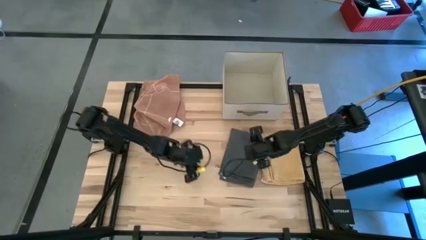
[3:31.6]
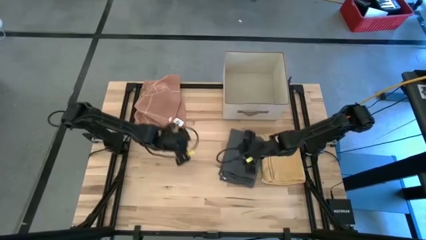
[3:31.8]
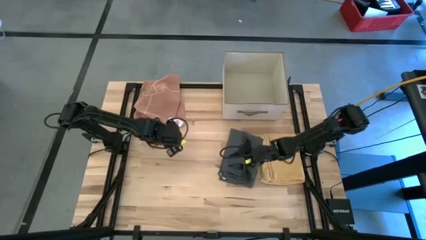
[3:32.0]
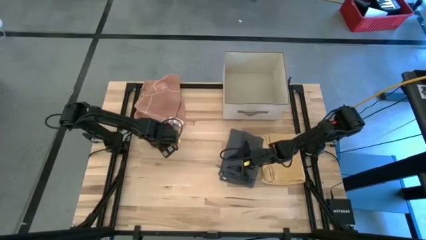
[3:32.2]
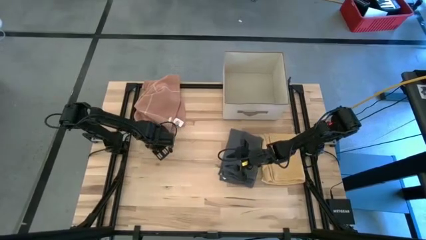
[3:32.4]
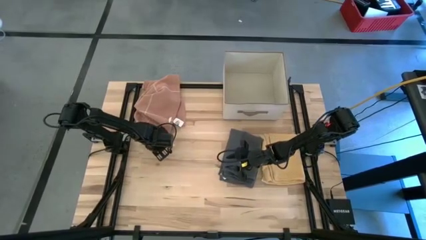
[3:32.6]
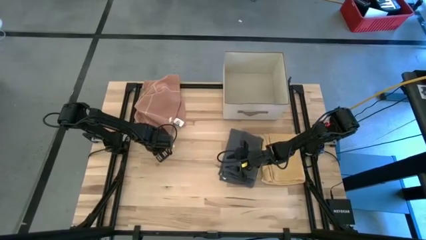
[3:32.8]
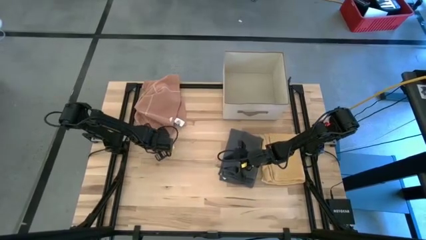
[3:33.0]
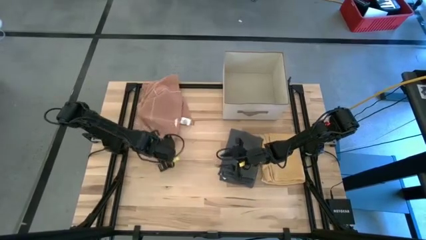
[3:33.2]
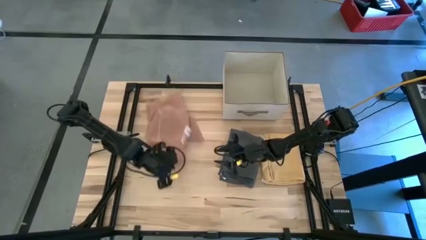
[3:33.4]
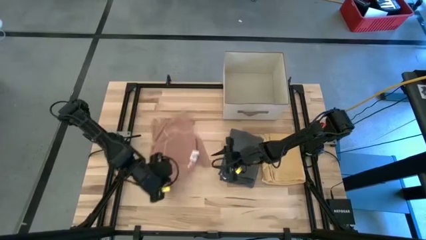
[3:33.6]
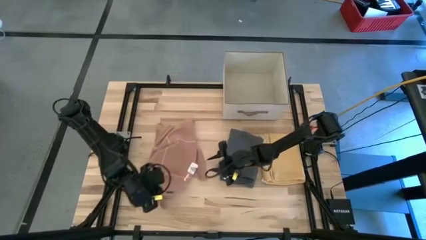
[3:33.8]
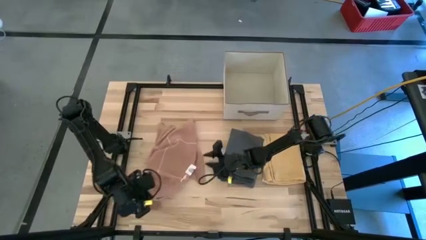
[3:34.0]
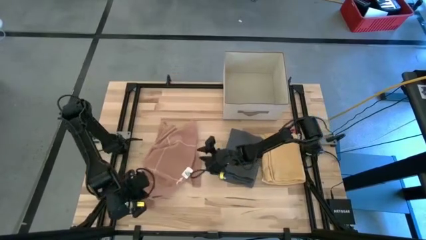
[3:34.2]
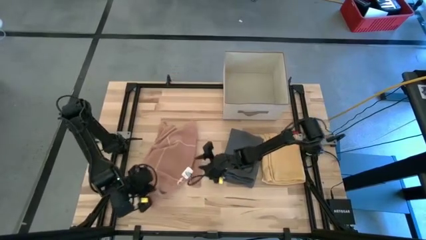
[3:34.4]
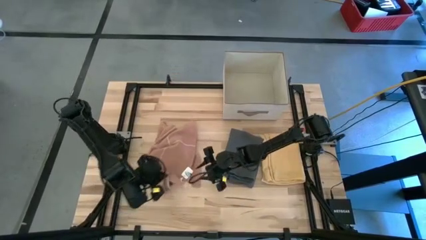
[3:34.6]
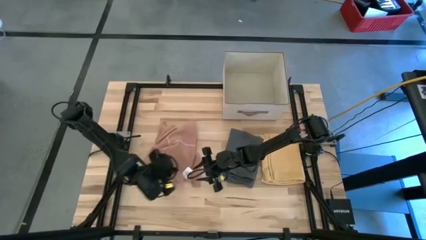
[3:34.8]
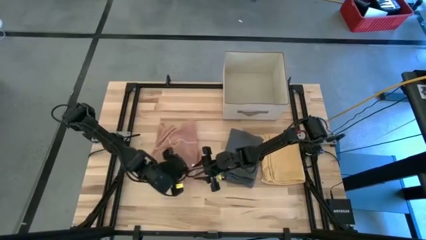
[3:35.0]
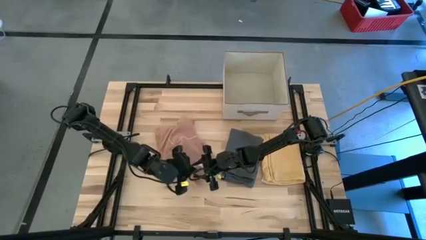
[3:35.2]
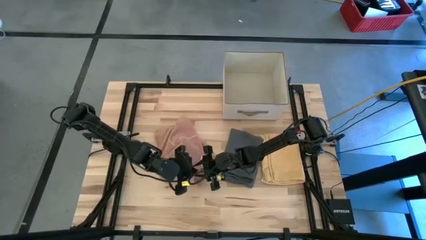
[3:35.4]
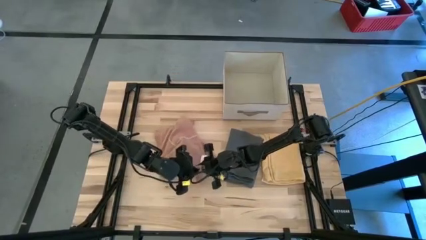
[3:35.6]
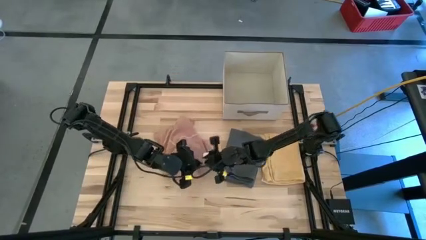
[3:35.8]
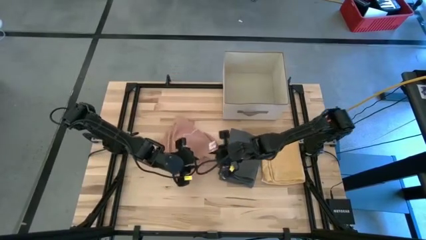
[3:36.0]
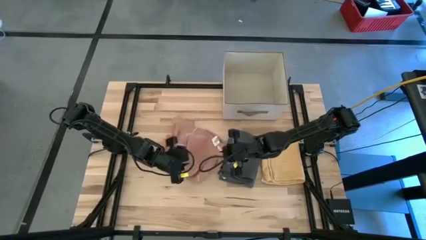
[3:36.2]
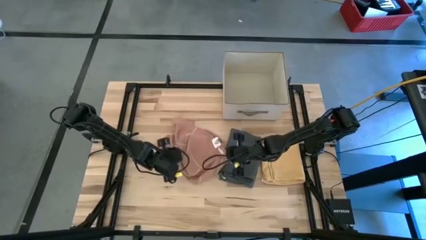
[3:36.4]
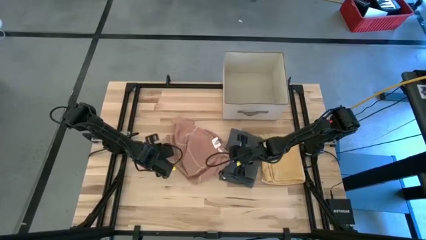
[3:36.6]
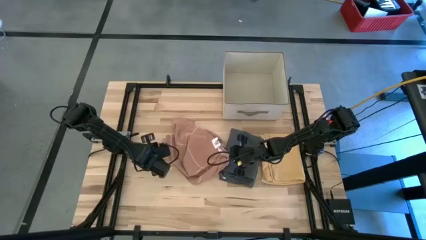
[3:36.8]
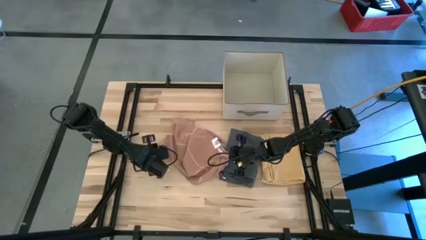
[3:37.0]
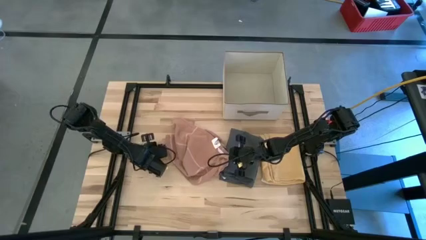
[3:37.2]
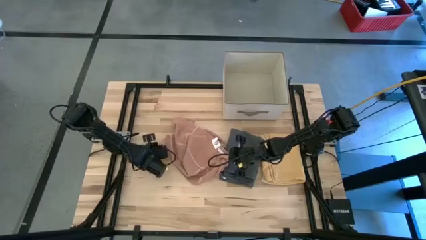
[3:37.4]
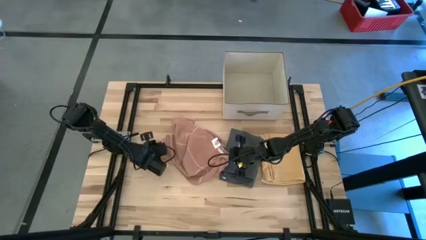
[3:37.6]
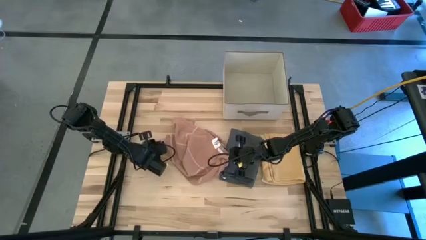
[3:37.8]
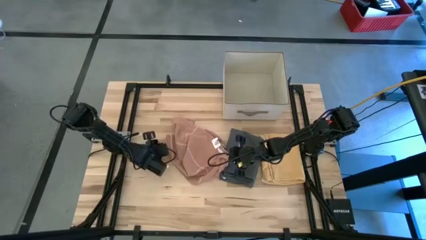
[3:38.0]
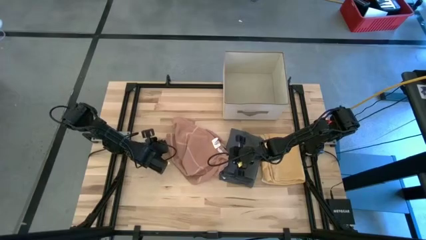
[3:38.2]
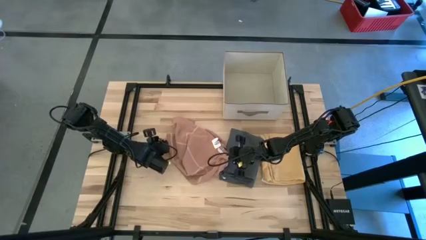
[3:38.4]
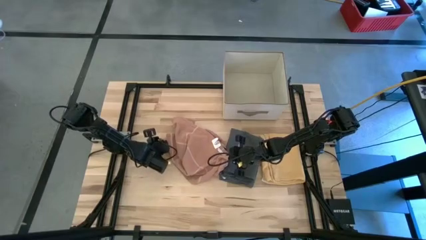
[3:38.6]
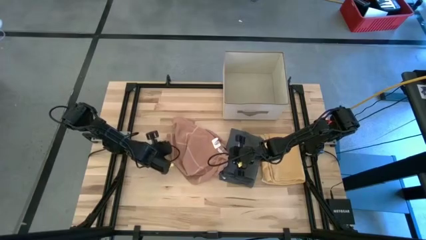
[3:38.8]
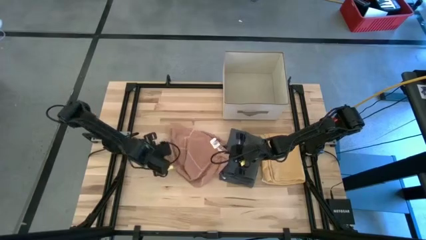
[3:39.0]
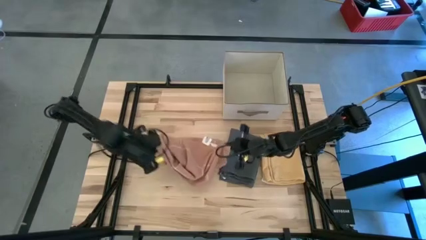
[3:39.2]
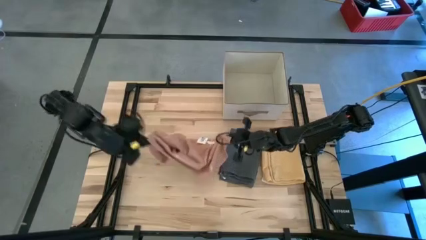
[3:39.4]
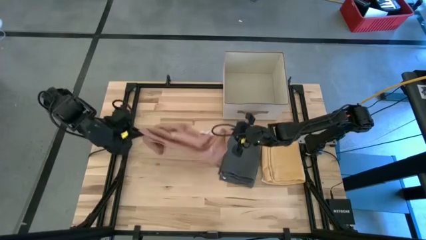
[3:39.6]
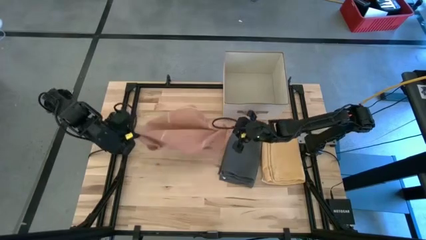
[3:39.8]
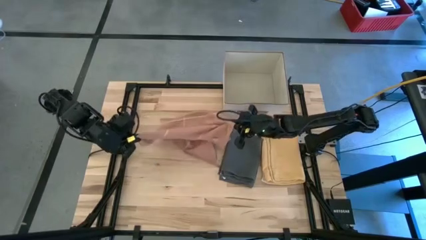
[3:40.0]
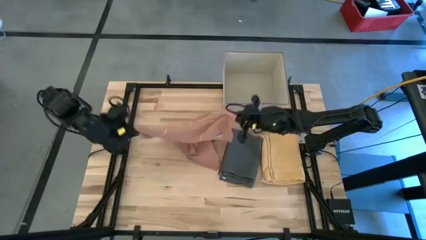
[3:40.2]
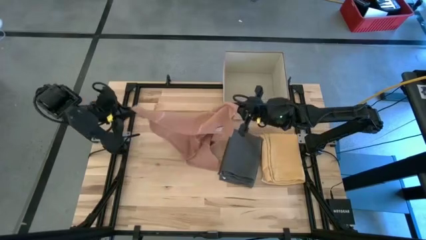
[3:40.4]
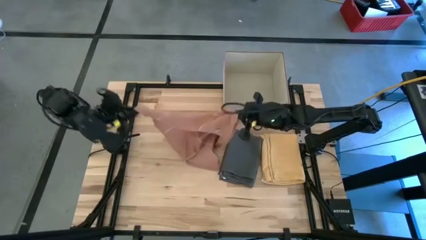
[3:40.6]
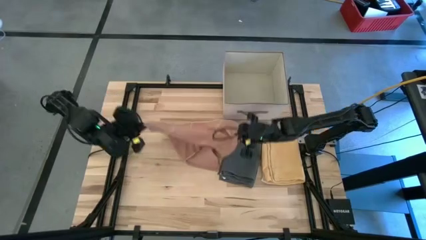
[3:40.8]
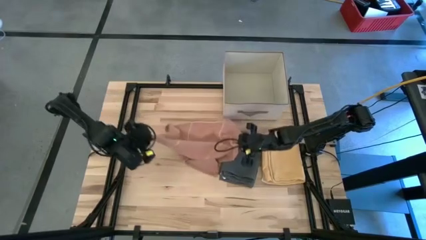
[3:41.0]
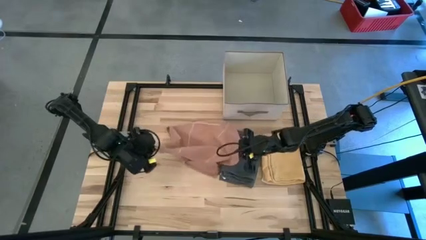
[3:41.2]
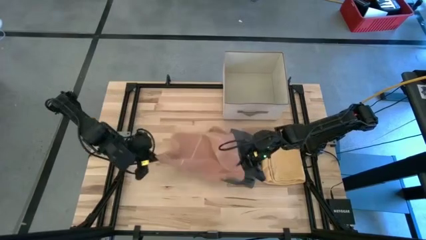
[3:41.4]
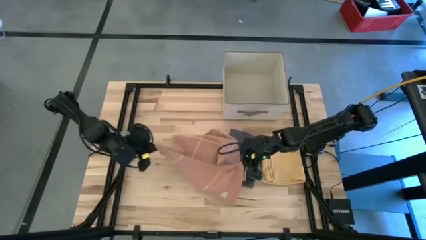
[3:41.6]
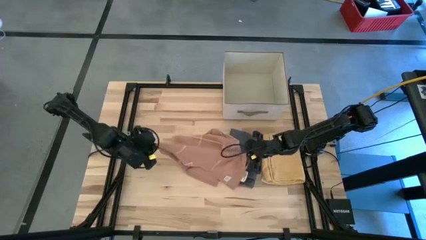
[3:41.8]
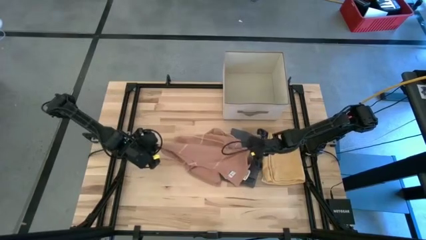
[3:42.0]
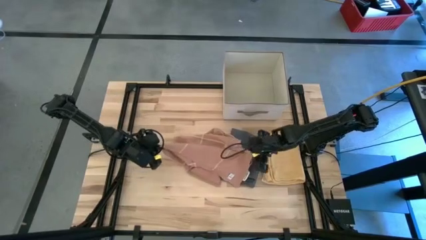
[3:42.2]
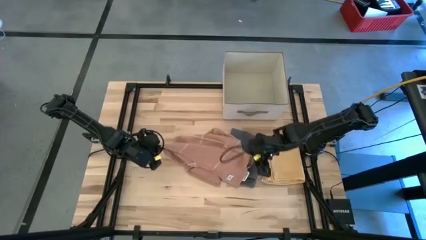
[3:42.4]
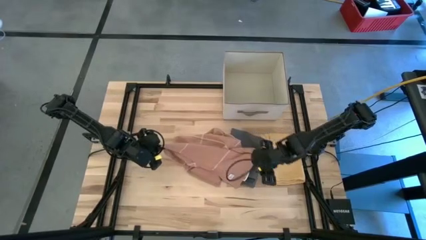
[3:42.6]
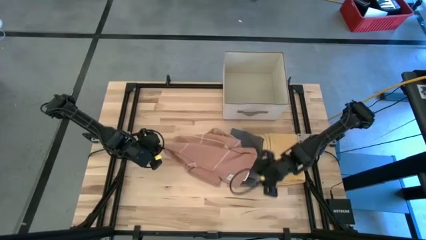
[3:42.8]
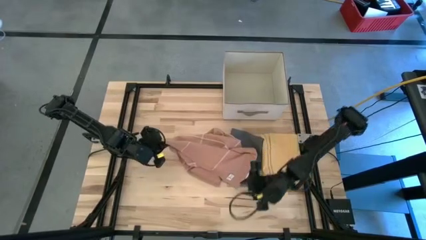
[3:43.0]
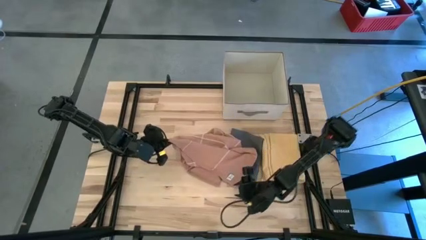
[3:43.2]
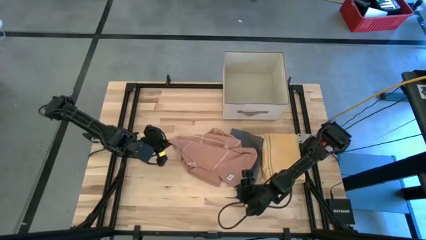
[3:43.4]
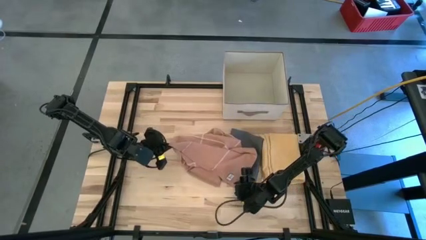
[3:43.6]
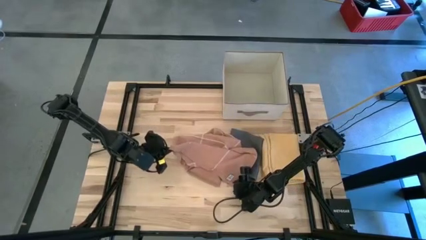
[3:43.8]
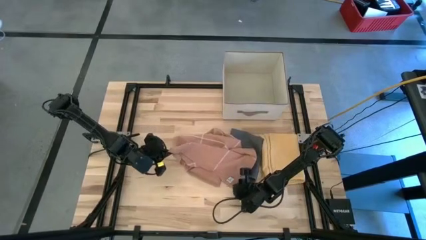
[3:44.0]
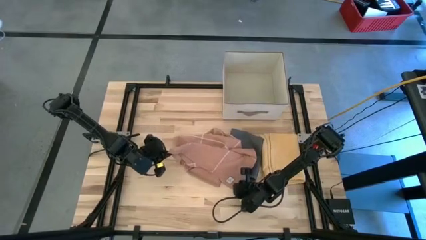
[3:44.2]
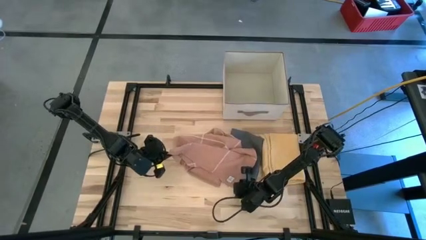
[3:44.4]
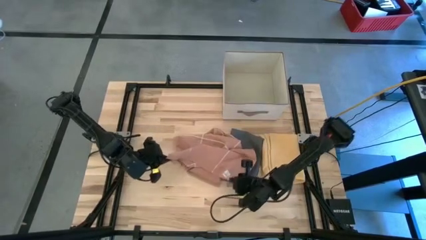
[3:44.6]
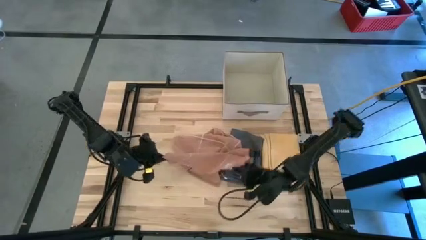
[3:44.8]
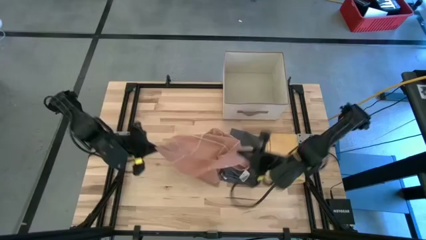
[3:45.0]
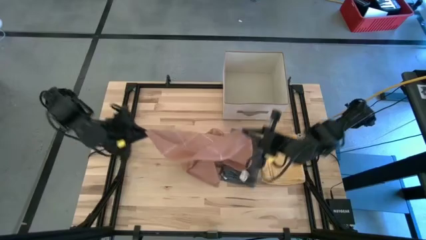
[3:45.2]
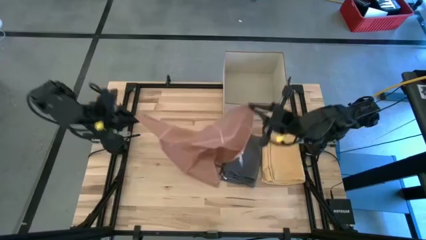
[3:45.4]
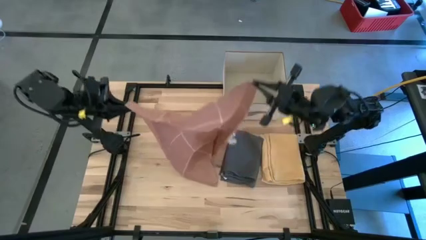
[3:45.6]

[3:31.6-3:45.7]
Task: Fold towel
Fold the brown towel

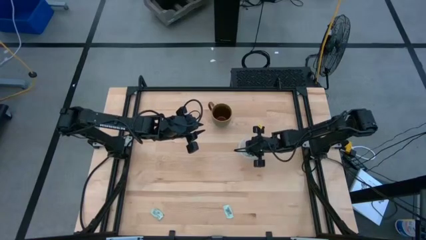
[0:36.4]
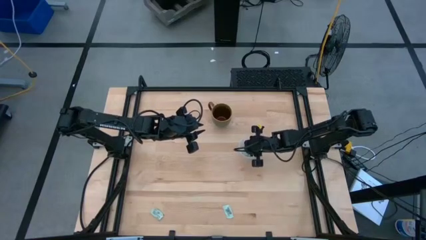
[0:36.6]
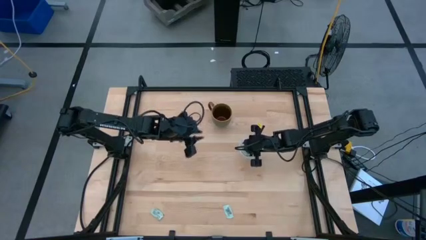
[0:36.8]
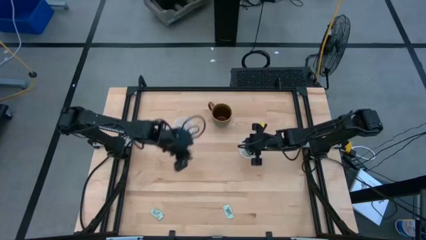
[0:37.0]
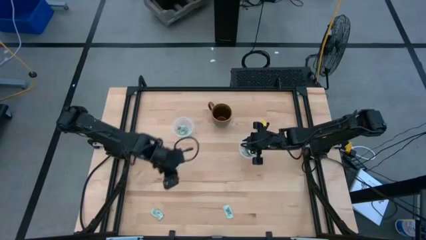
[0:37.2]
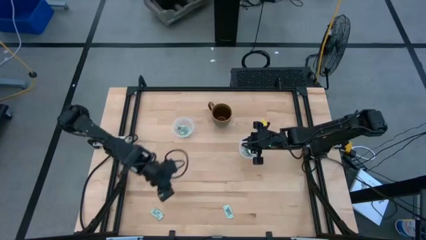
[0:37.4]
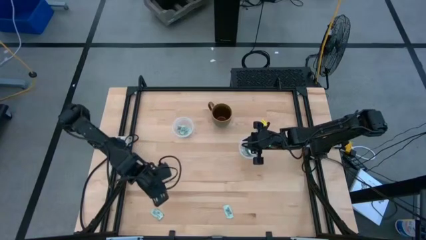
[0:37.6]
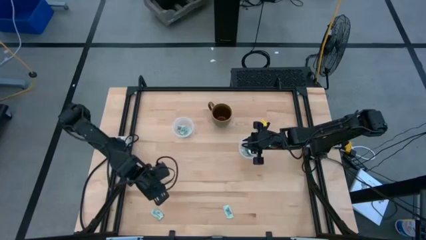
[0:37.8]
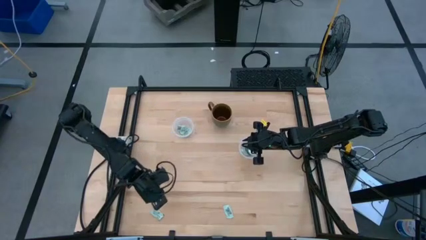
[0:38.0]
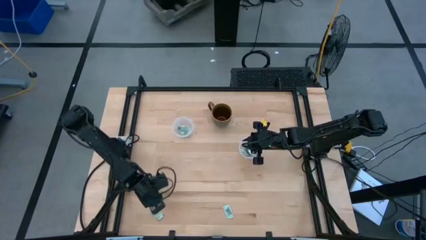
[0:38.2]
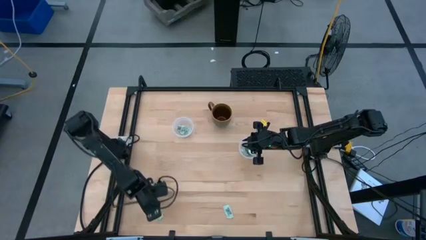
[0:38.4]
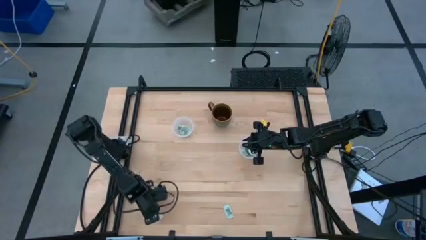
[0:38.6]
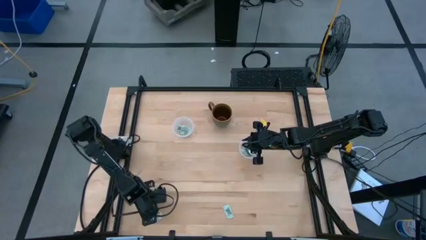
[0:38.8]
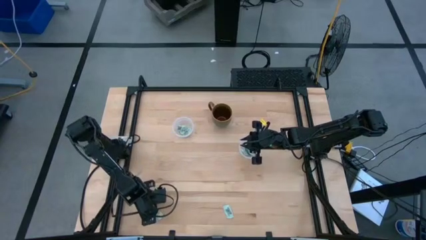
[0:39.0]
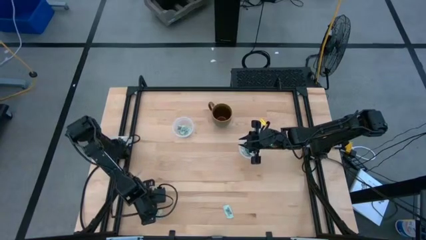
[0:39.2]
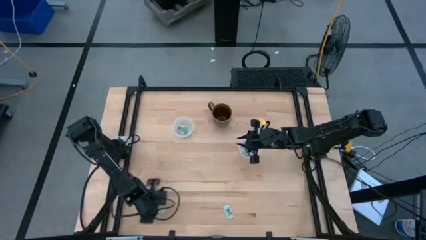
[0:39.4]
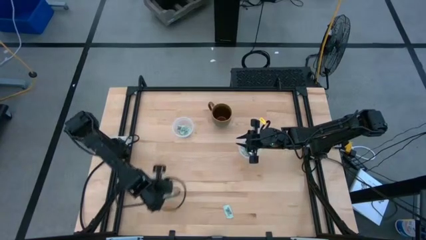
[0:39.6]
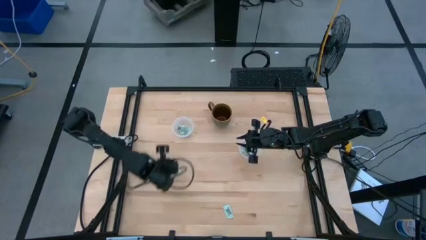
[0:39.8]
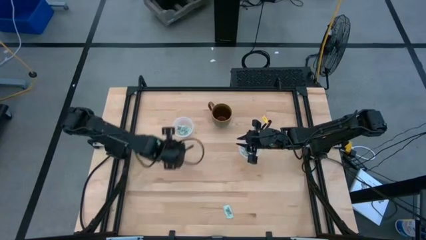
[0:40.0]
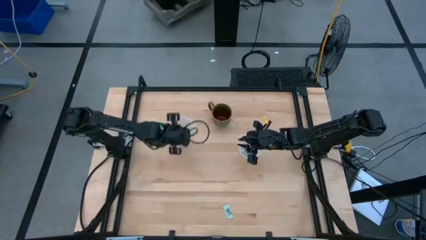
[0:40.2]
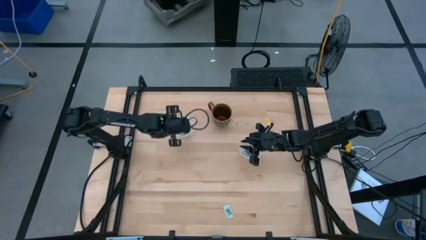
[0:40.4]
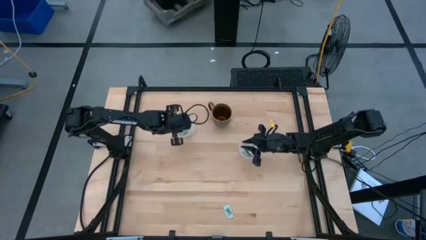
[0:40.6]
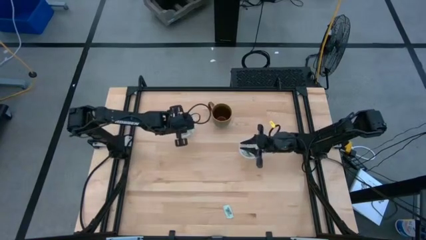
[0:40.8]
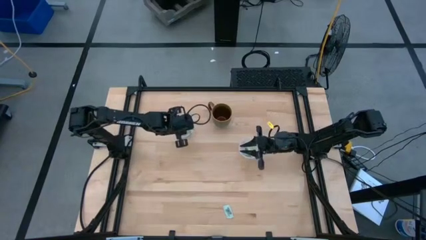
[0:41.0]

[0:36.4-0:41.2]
Task: Pick and place Stevia / Truvia into bins
Put the white stevia packet into the left round transparent container
